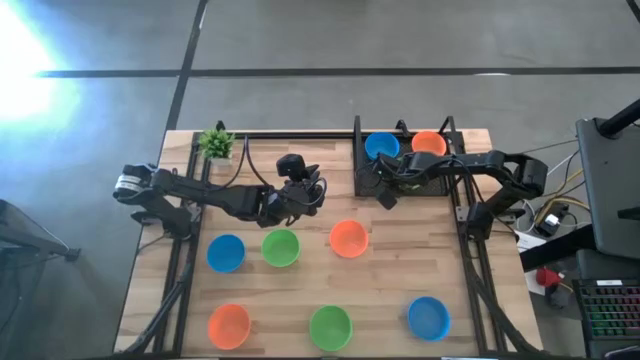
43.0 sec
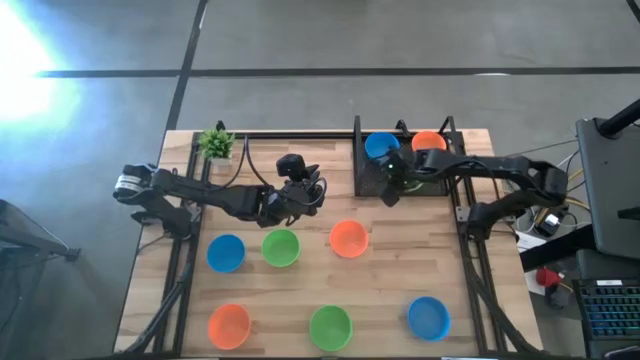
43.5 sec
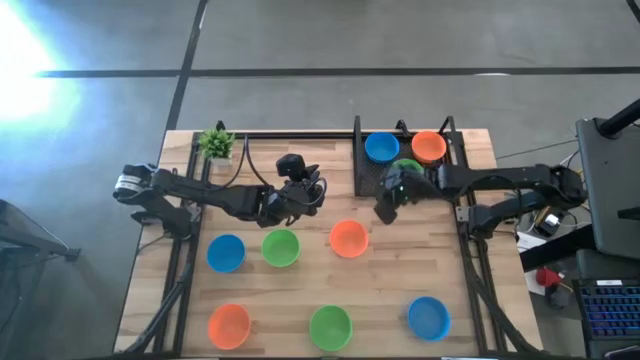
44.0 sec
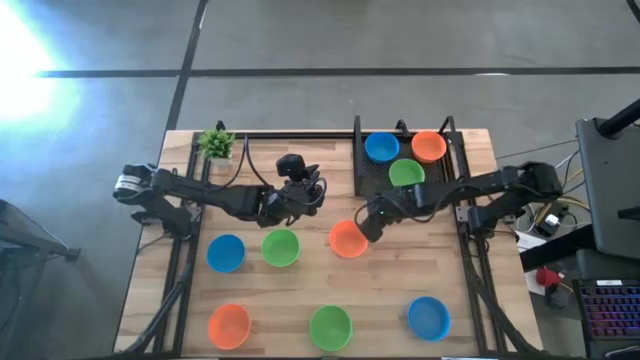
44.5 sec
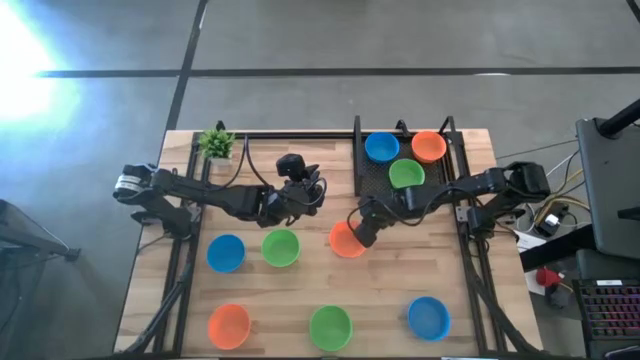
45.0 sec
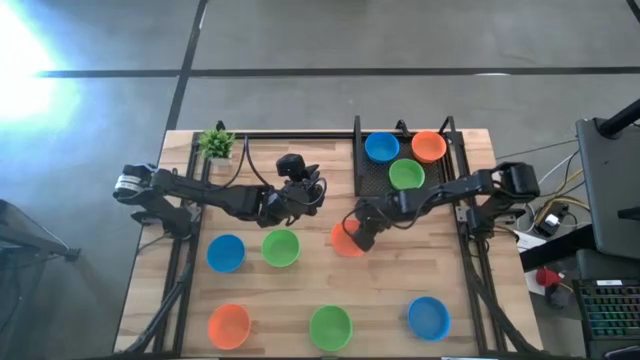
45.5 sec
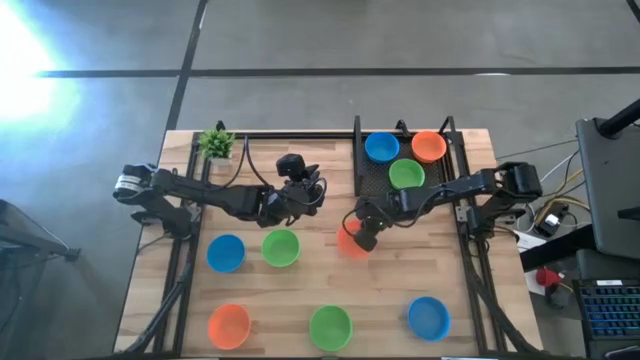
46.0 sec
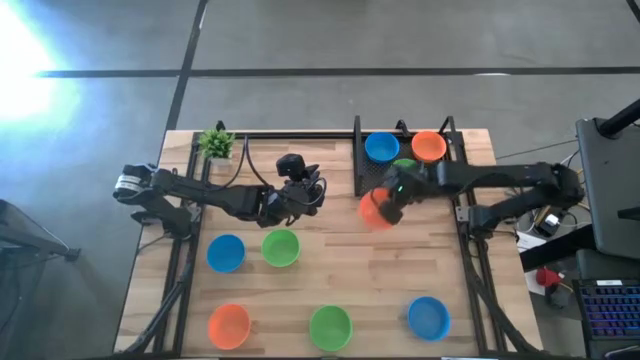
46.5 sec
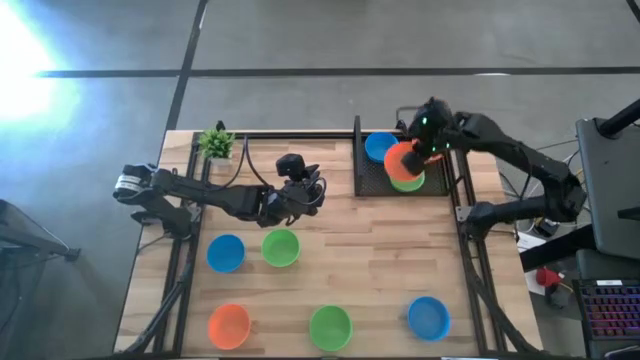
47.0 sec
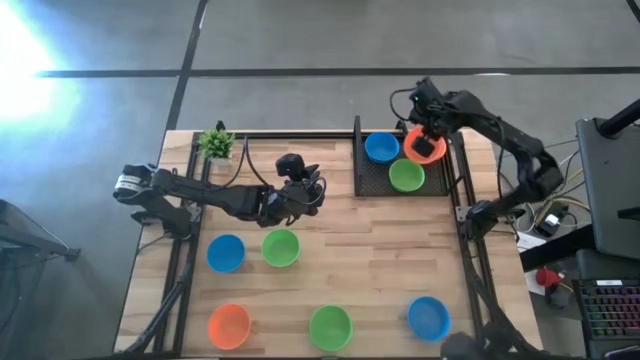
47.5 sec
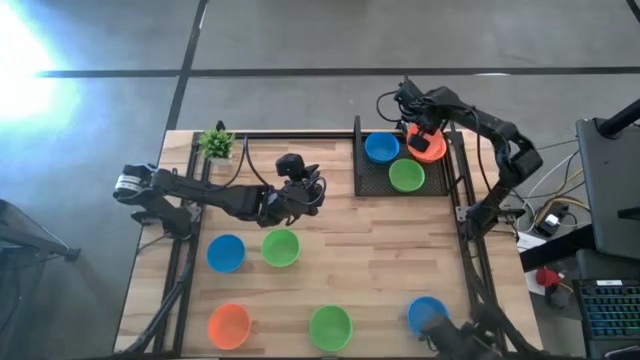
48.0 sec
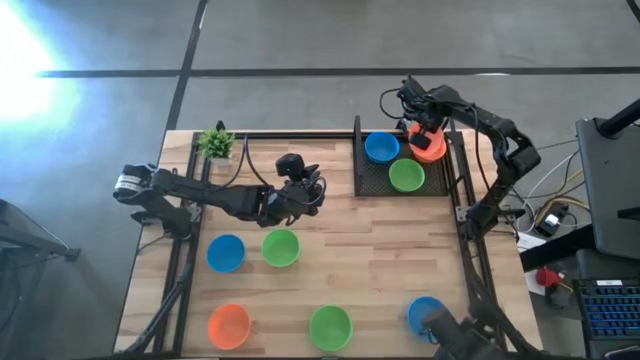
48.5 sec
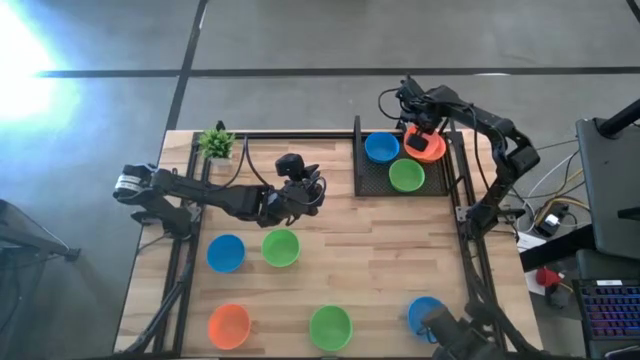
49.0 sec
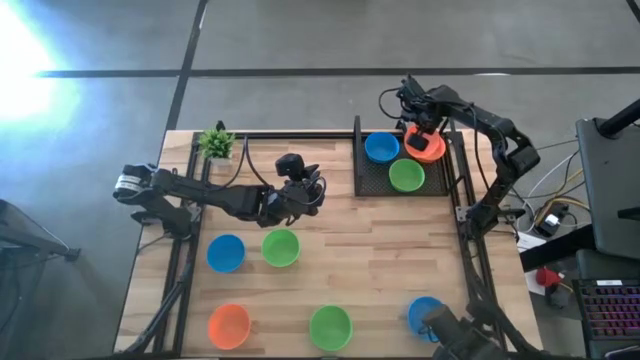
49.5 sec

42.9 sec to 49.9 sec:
Task: Pick & Place Mini bowls
Stack the top orange bowl on top of the orange bowl on the shelf

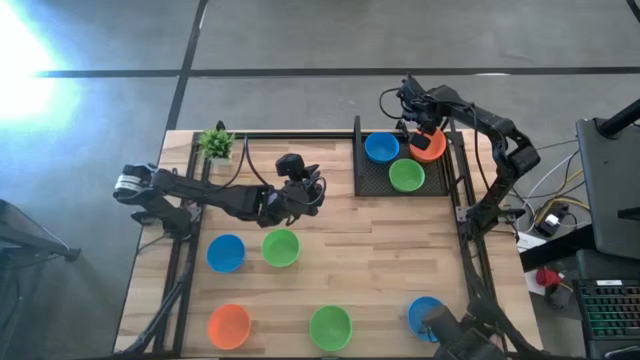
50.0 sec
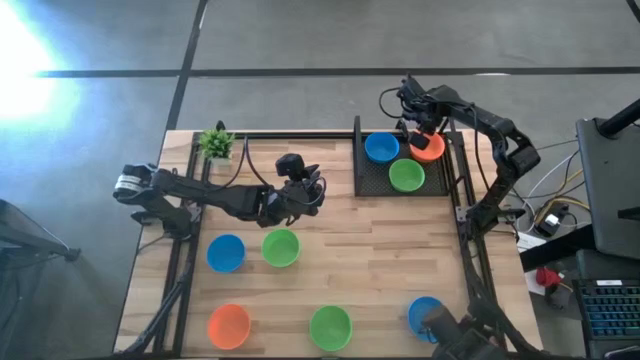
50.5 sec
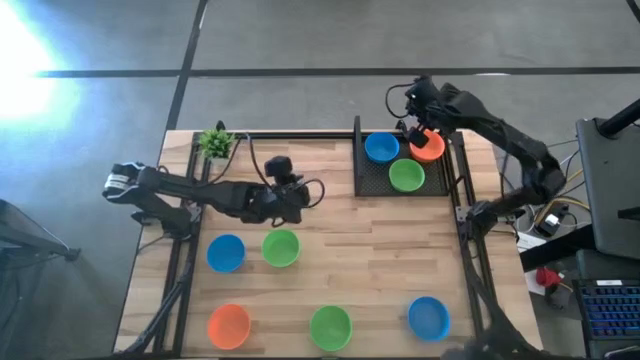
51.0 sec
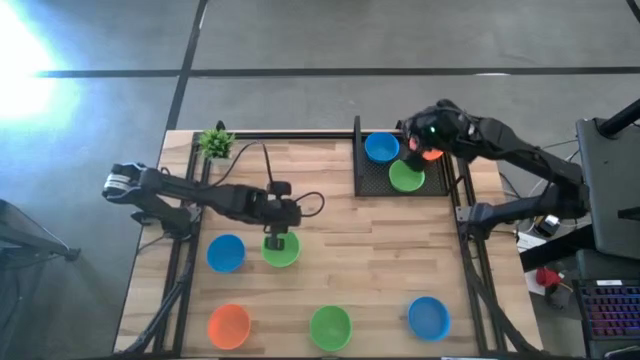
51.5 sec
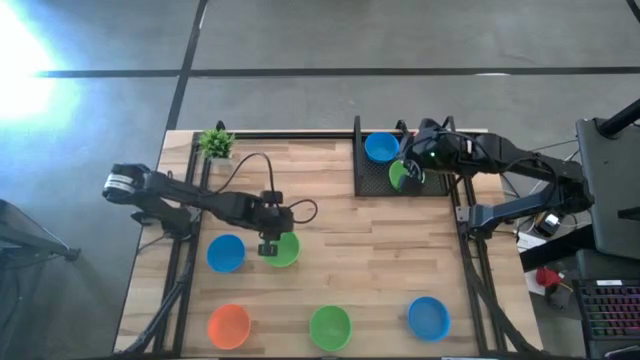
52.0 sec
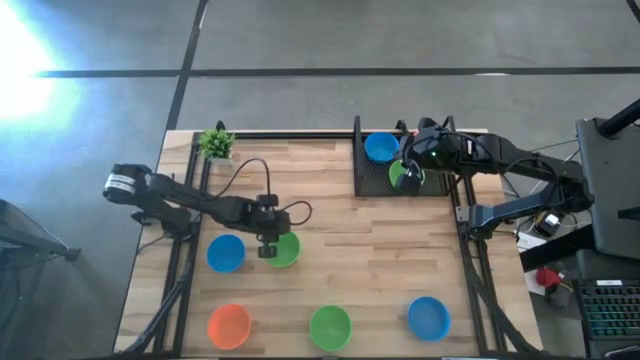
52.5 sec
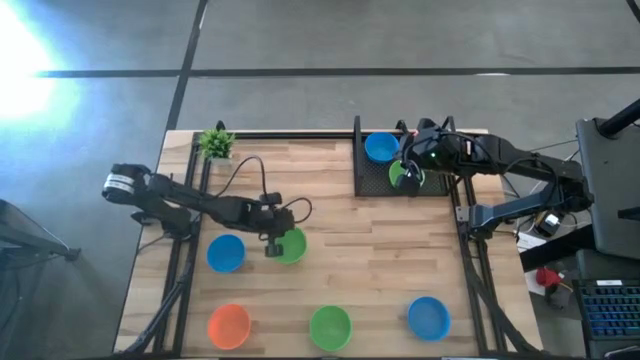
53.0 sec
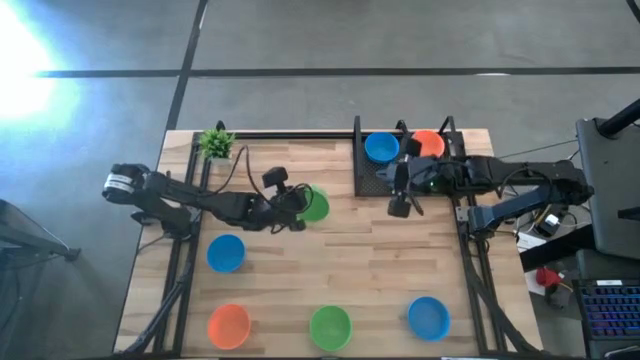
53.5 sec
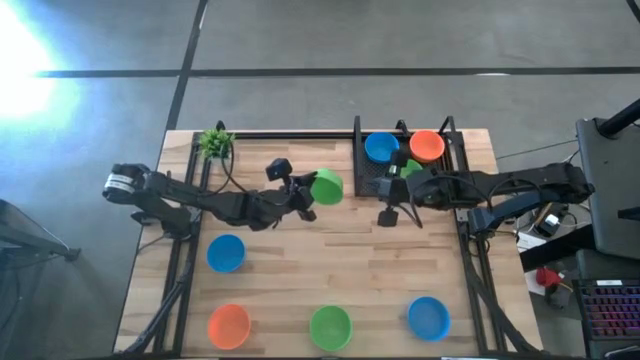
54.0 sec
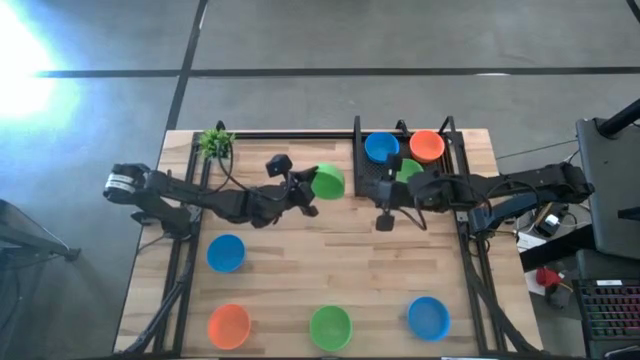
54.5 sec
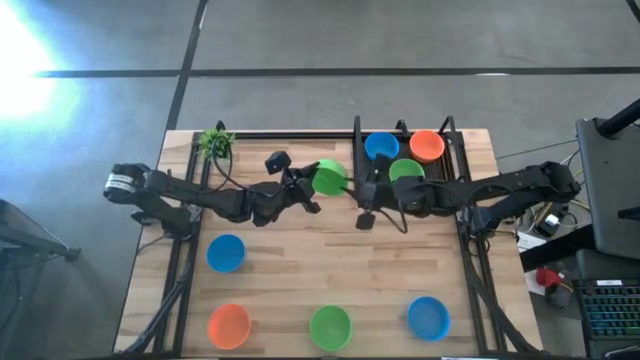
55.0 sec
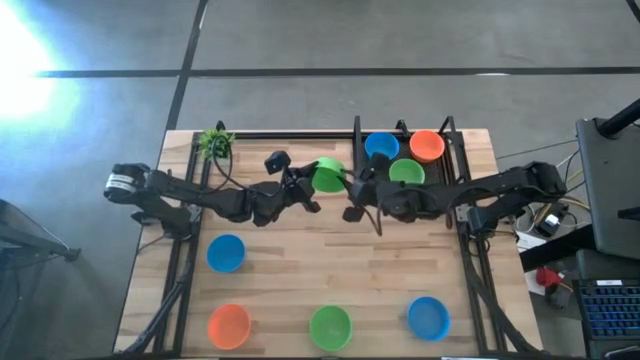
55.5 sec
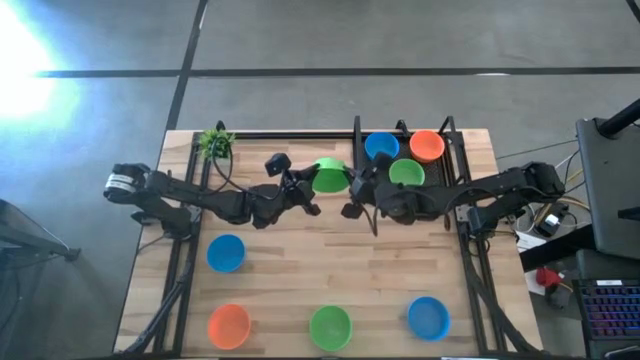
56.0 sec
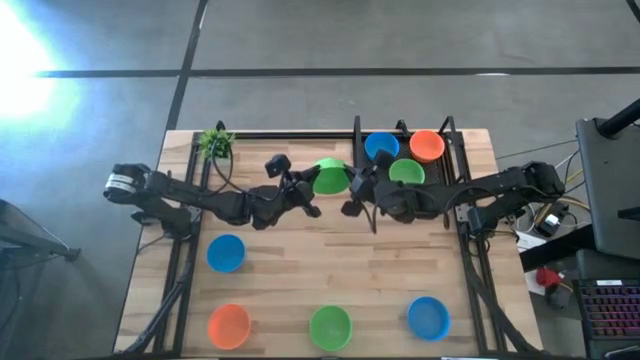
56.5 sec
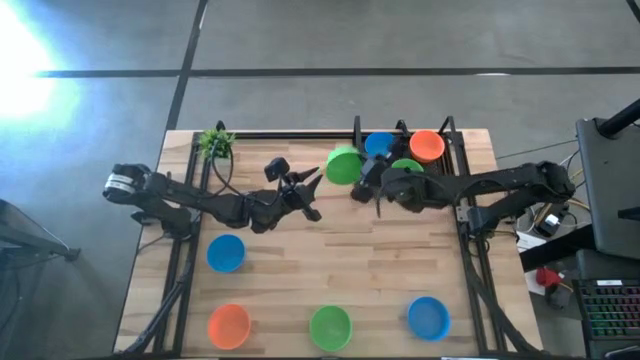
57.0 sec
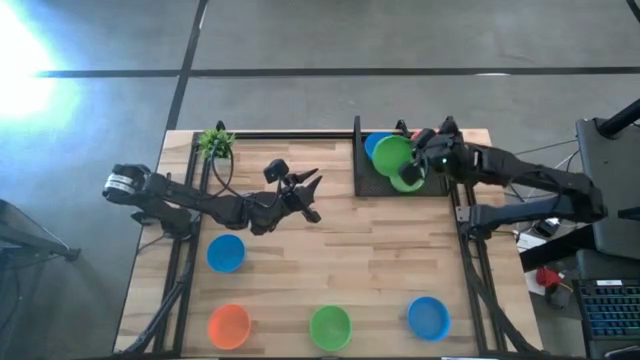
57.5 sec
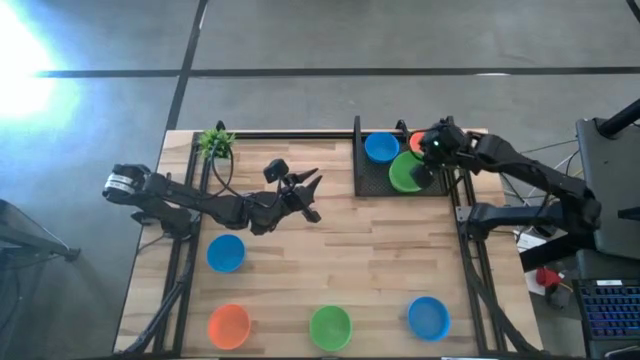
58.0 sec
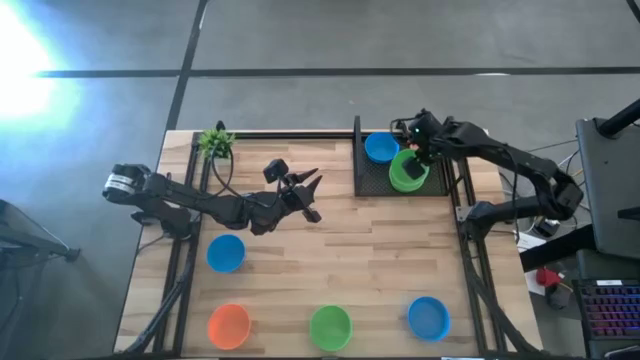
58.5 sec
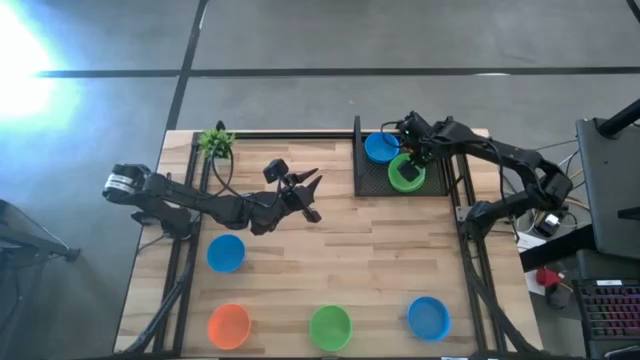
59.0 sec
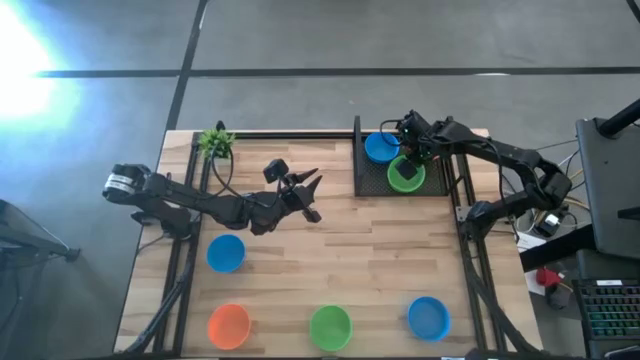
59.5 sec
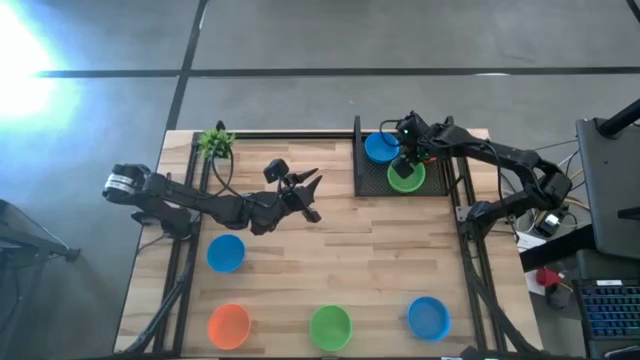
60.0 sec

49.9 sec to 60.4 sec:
Stack the top green bowl on top of the green bowl on the shelf

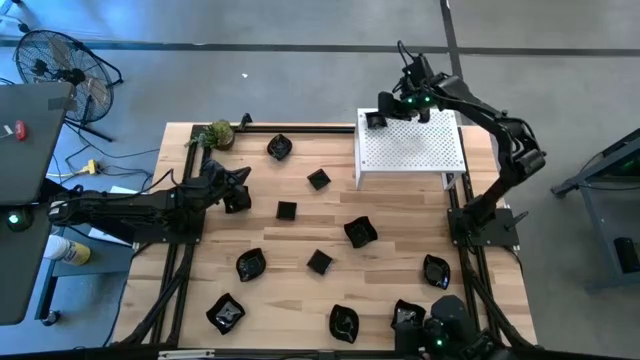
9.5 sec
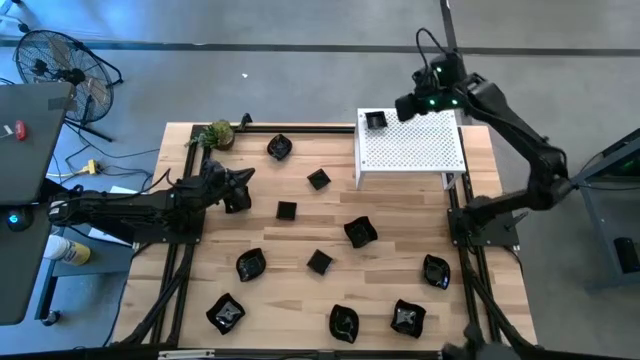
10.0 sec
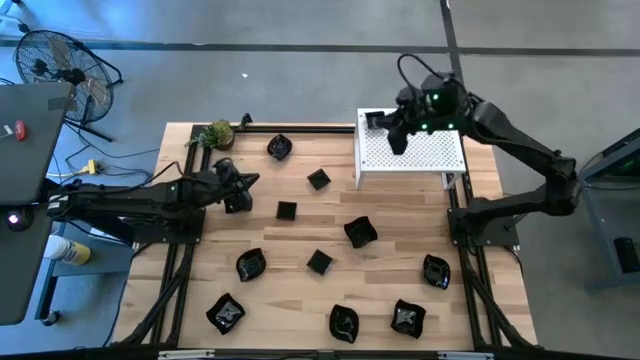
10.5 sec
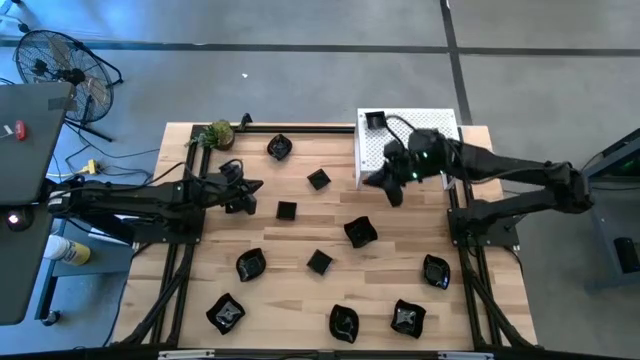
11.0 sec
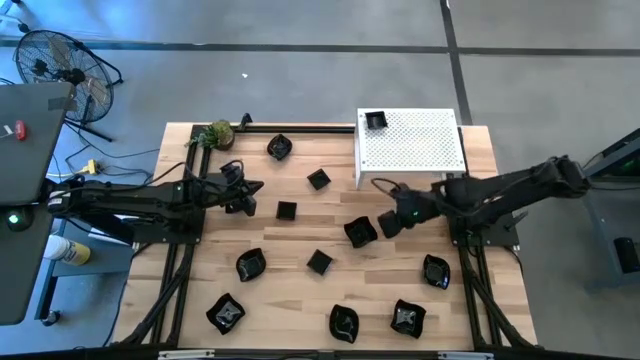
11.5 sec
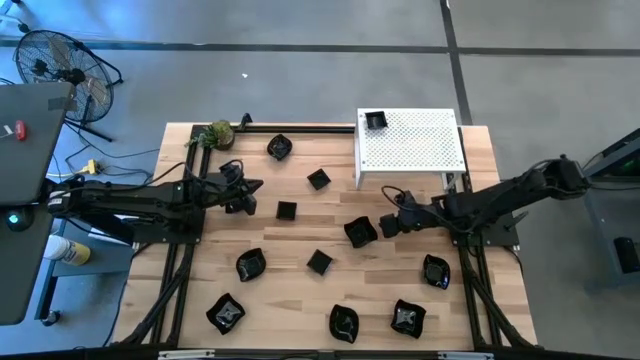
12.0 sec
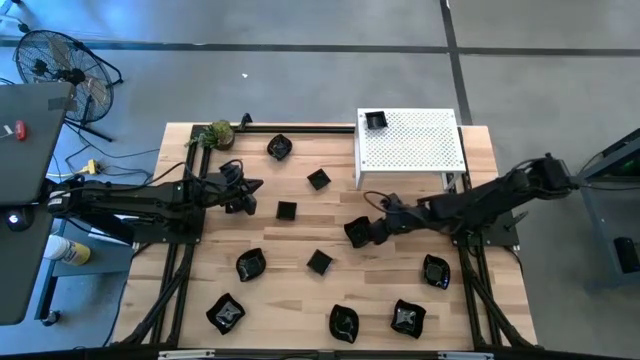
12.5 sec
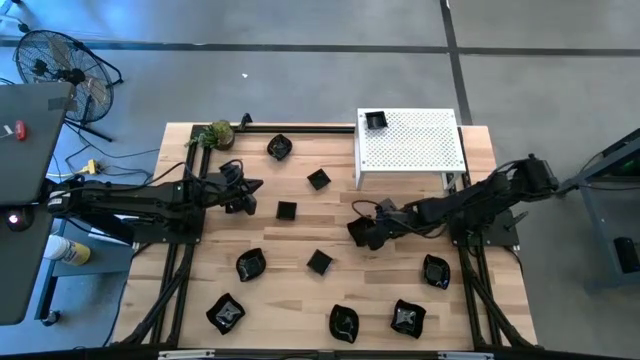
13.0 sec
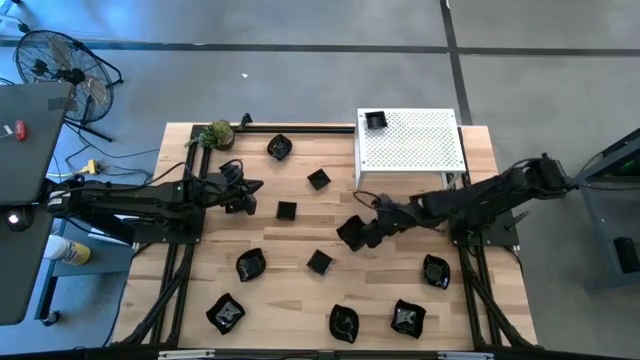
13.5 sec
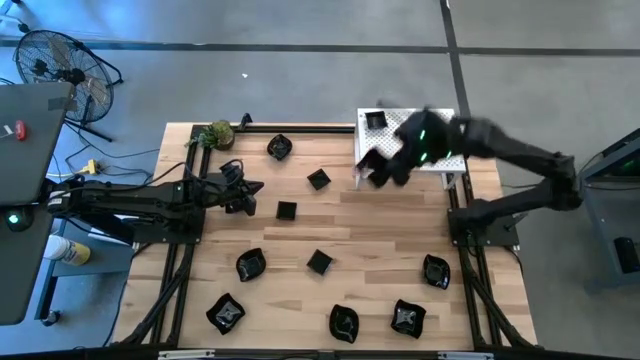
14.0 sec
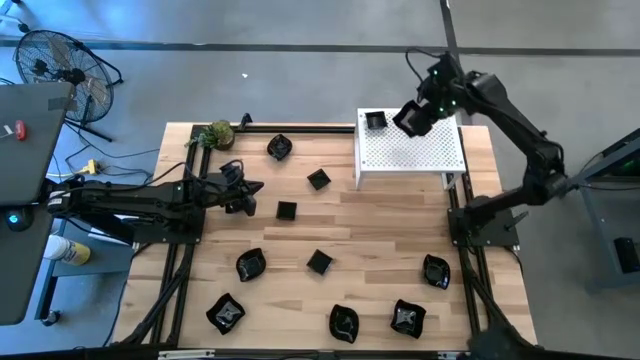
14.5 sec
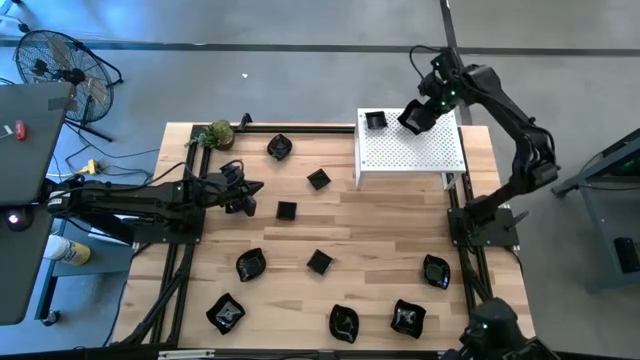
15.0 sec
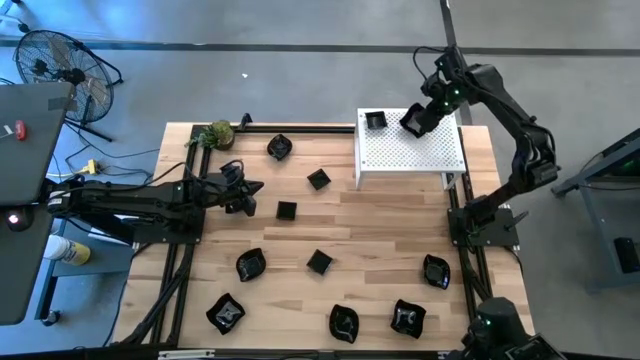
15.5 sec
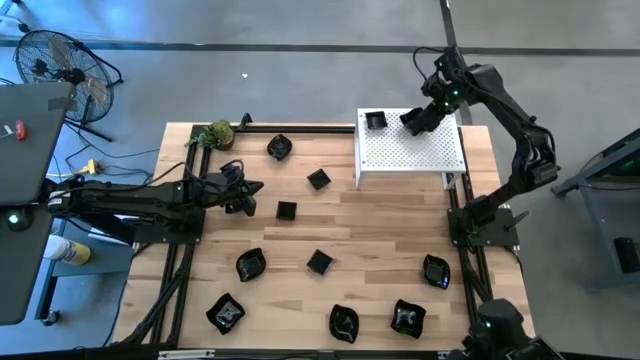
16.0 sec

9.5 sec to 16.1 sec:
Task: Pick & Place Mini shaped plates
Put the distorted square plate on the shelf
